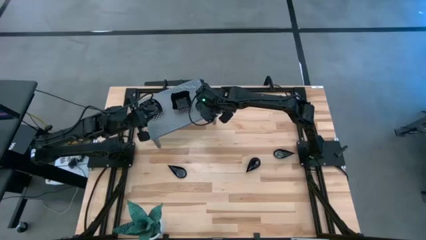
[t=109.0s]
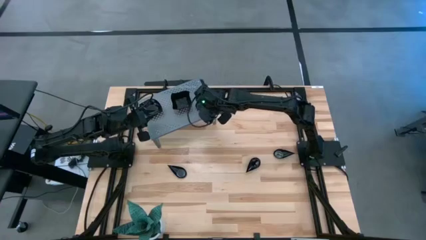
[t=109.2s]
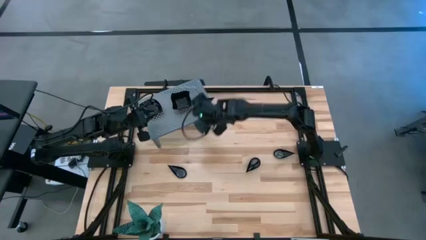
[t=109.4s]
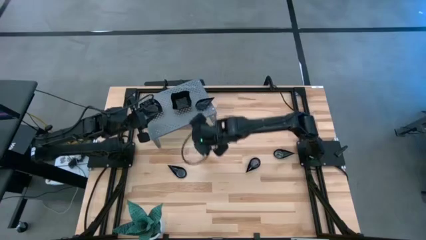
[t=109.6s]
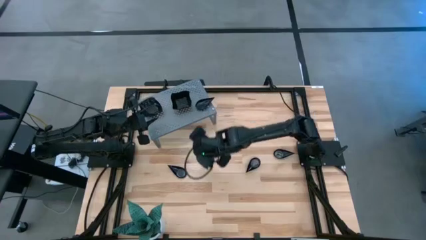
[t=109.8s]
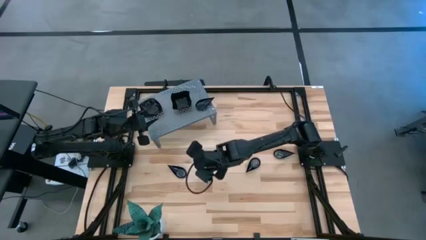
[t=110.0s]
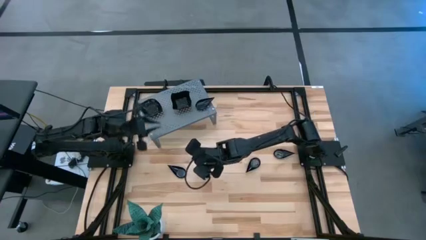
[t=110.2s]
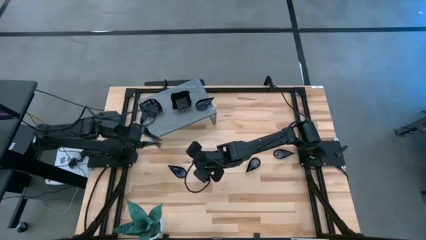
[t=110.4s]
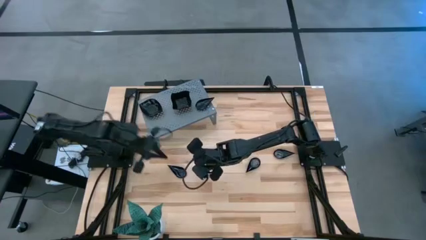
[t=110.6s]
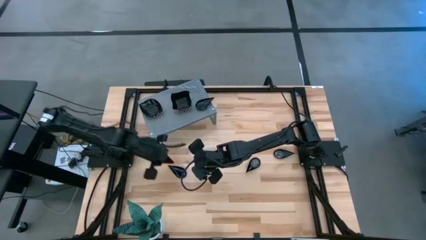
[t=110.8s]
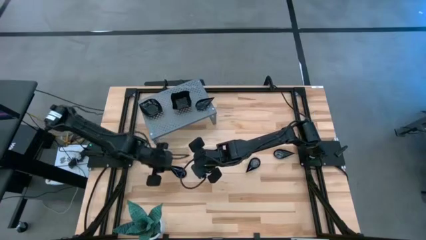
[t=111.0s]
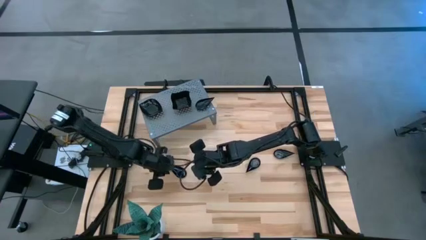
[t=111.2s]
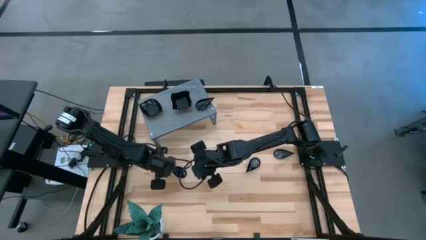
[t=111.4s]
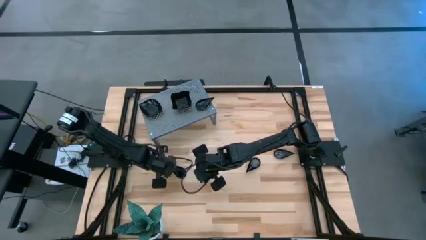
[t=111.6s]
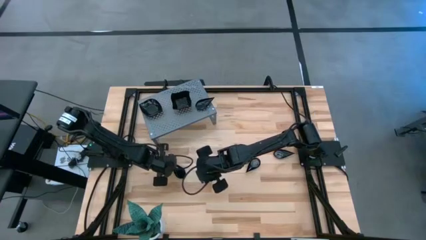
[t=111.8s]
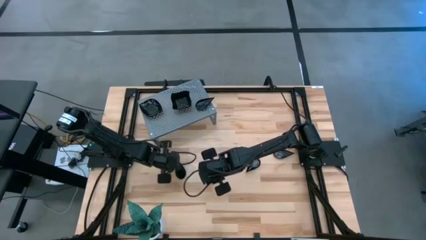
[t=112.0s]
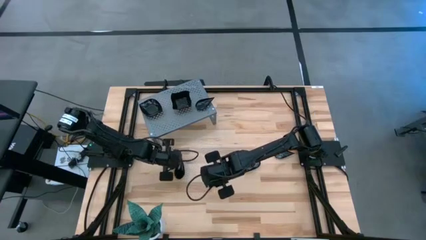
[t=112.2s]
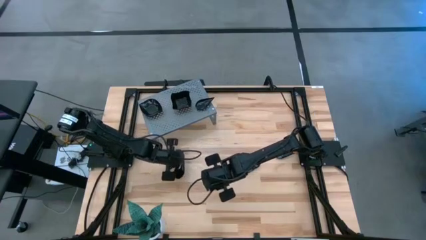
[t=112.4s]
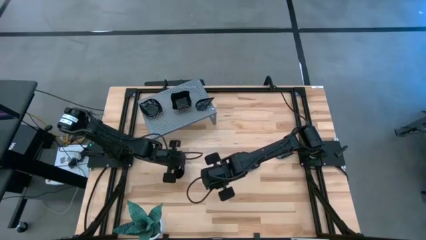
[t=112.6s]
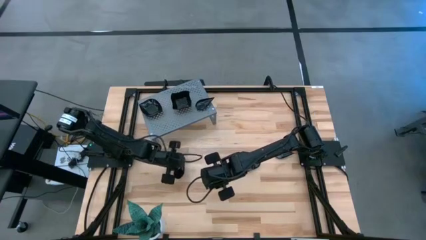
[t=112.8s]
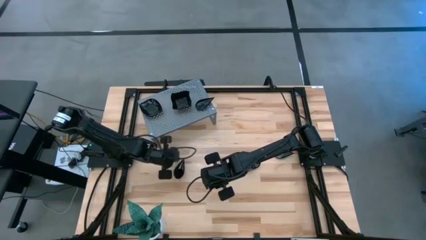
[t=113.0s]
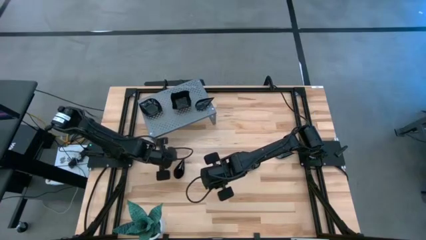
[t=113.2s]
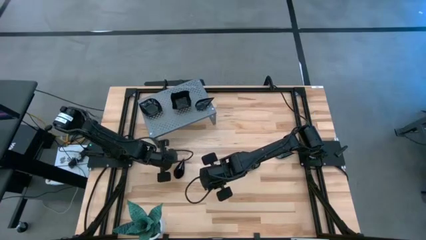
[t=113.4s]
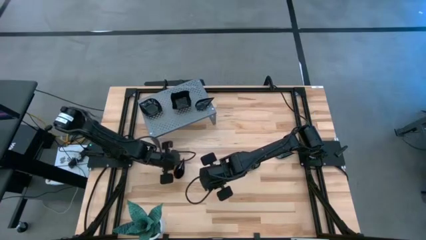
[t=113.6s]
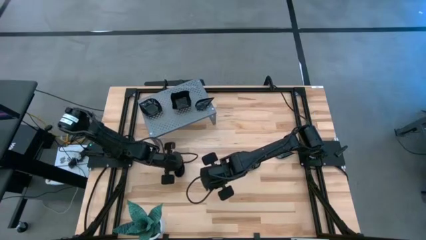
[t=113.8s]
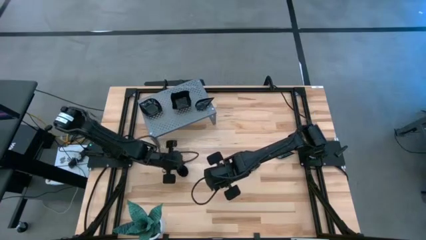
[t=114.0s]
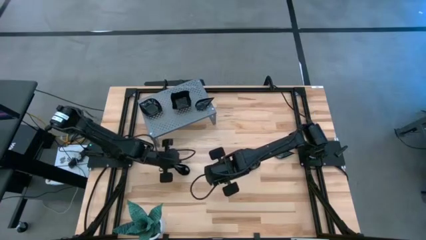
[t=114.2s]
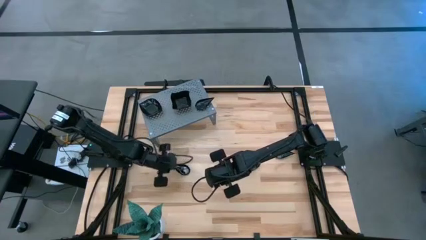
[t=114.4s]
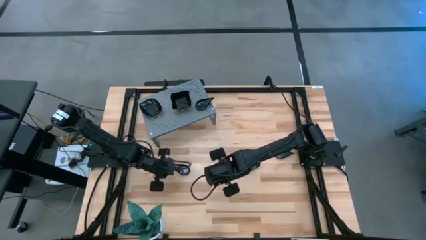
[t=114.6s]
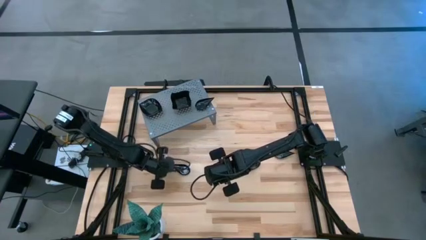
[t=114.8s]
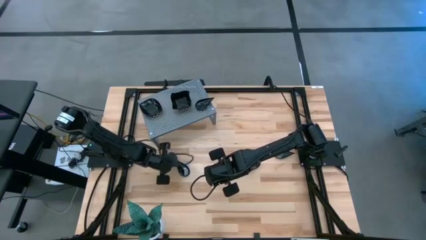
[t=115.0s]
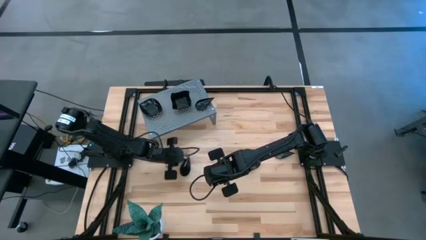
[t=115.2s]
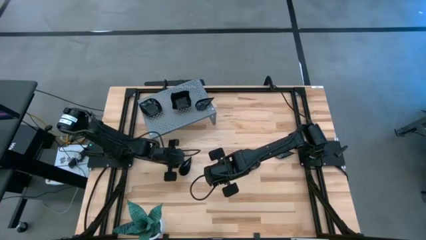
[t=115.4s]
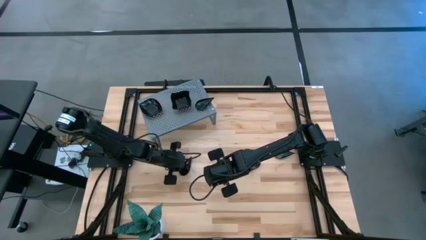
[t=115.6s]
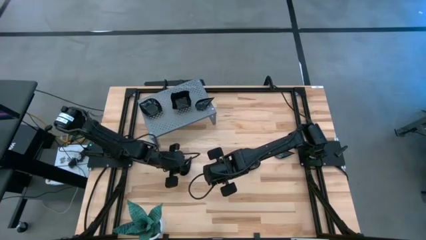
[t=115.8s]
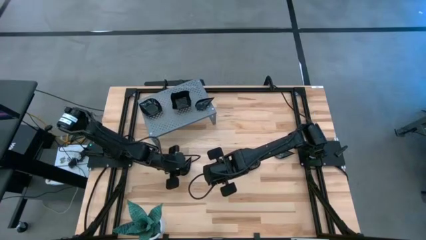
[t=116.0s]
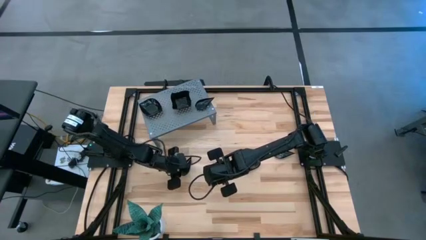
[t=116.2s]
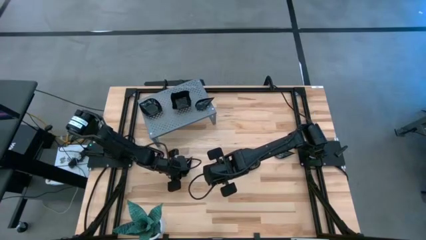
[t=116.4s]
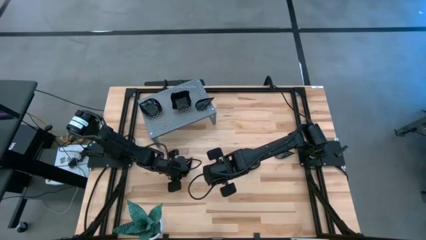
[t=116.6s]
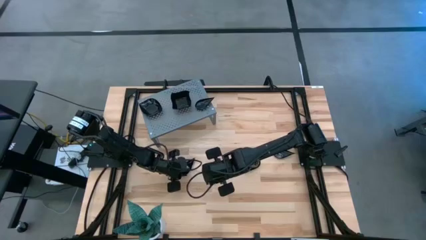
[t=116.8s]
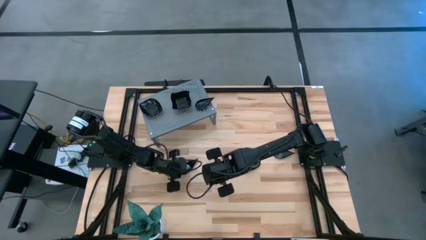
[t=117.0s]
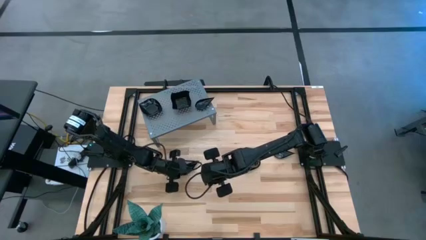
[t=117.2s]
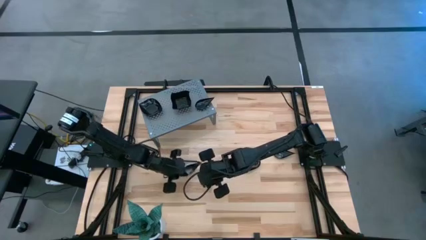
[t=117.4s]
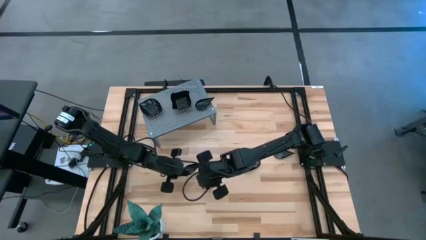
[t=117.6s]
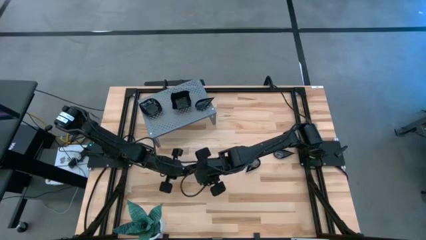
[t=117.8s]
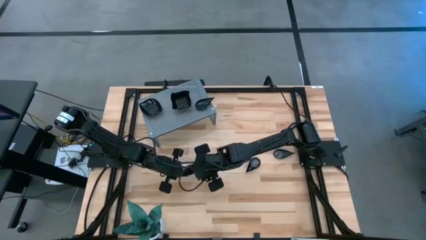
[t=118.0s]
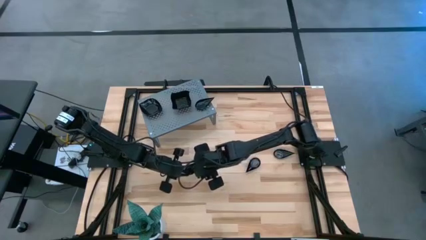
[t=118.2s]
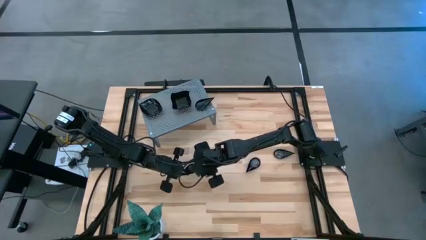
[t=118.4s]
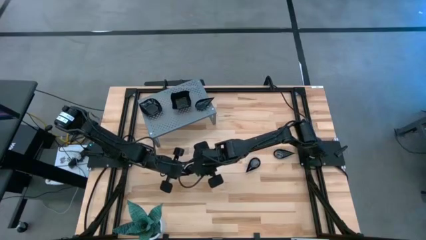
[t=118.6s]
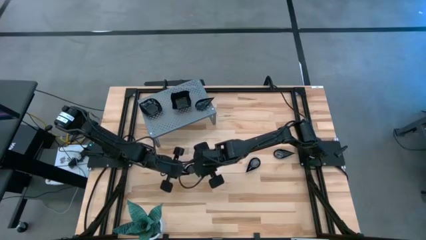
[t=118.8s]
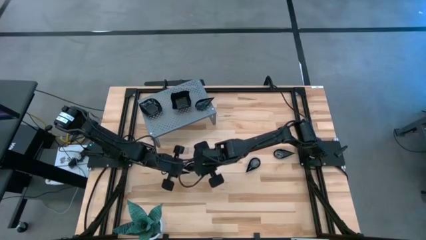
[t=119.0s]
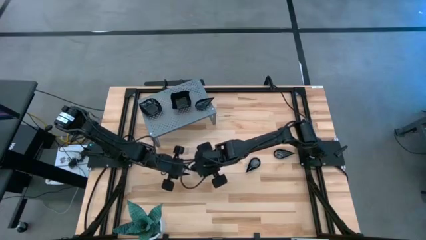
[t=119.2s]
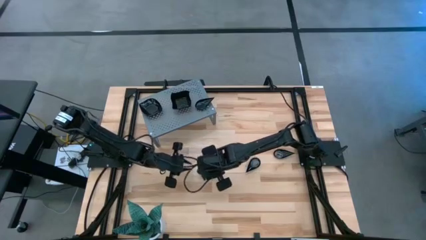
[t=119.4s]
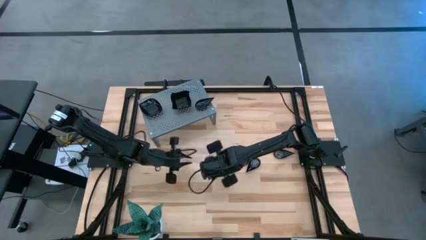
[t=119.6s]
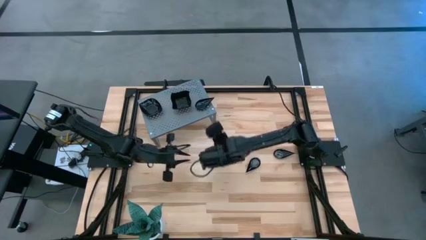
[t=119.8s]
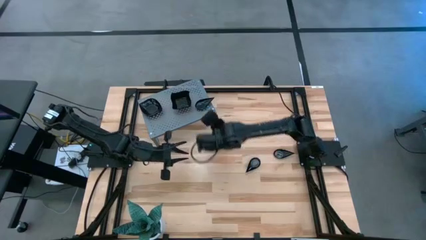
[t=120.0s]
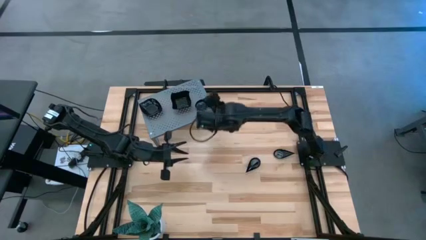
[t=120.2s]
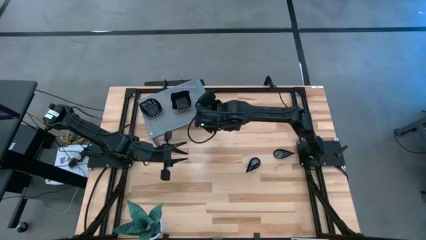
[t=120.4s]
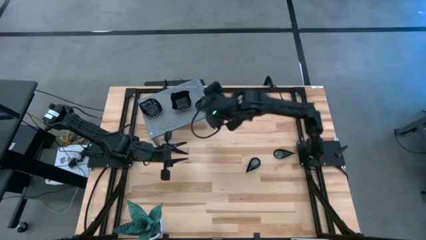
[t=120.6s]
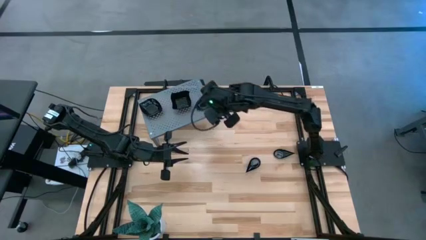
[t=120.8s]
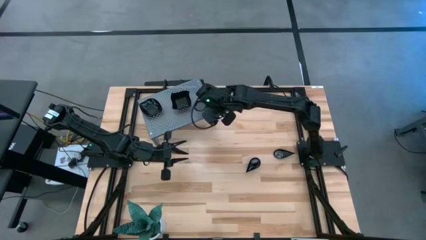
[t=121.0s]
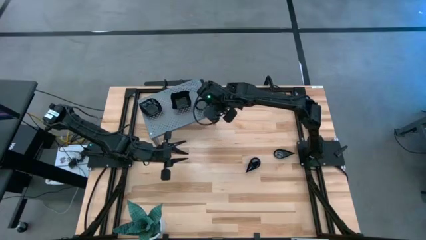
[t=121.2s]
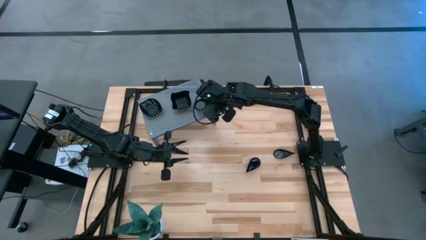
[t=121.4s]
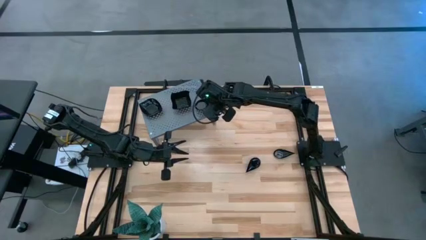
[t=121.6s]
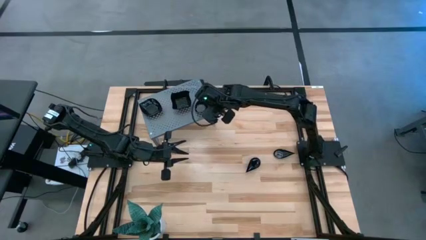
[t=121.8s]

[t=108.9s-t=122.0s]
Task: Pick & Place Mini shaped plates
Stack the black drop-shaped plate on top of the black drop-shaped plate on the shelf

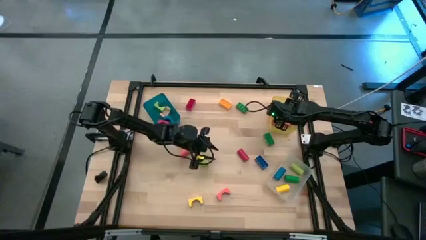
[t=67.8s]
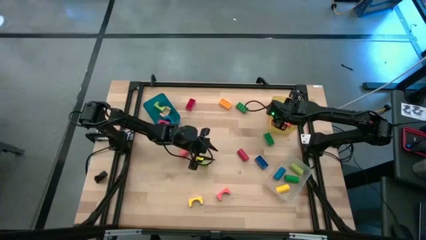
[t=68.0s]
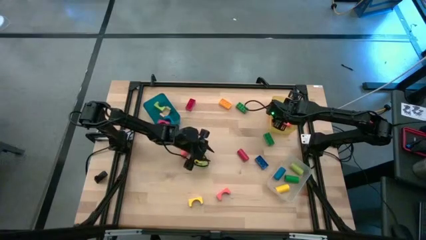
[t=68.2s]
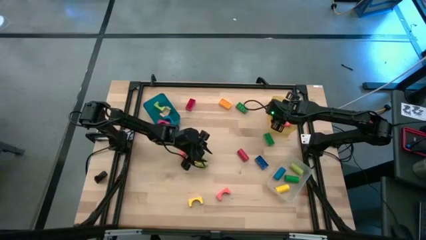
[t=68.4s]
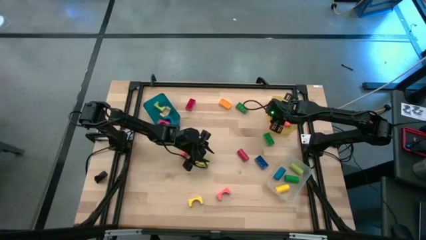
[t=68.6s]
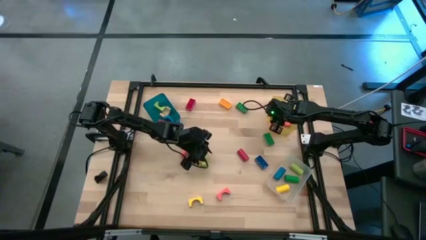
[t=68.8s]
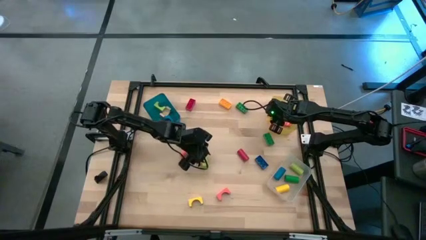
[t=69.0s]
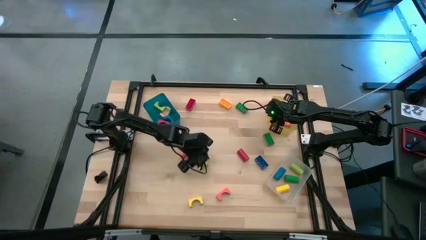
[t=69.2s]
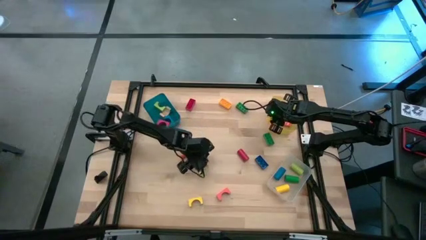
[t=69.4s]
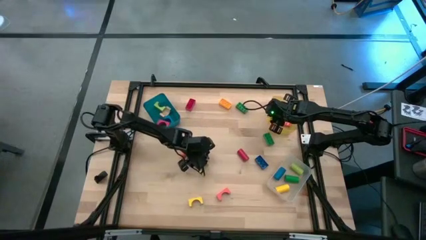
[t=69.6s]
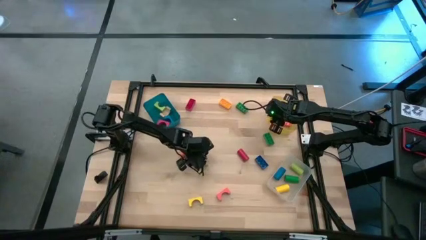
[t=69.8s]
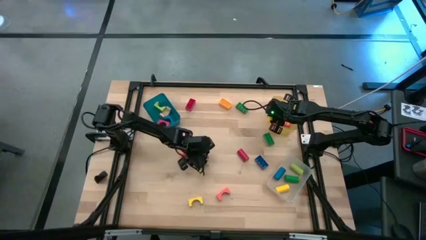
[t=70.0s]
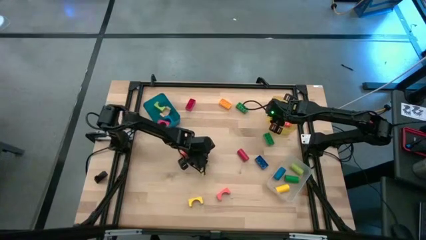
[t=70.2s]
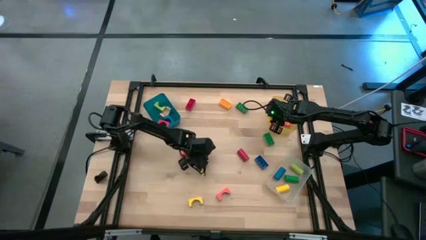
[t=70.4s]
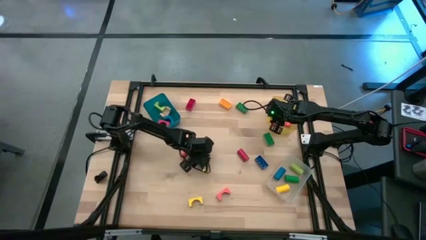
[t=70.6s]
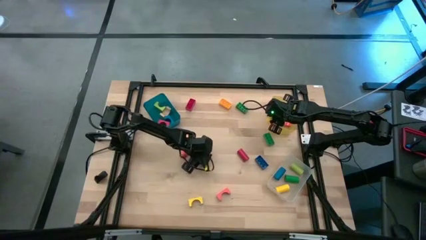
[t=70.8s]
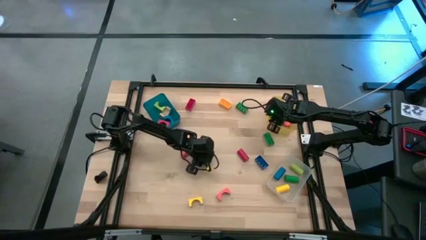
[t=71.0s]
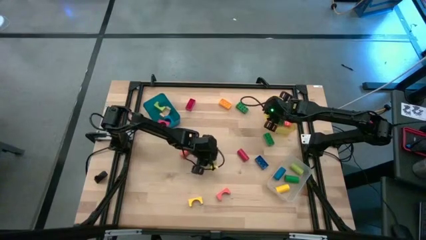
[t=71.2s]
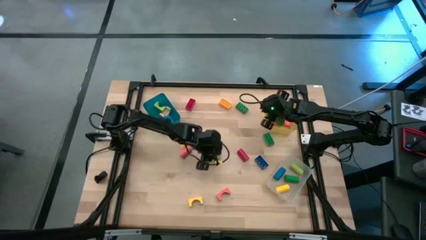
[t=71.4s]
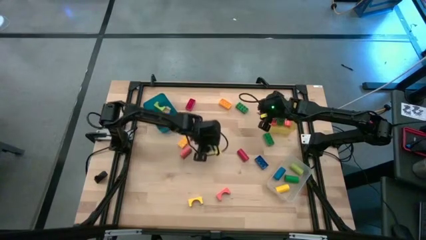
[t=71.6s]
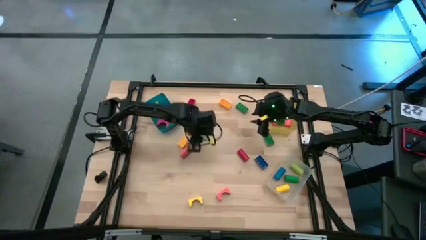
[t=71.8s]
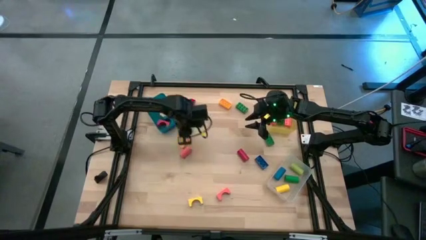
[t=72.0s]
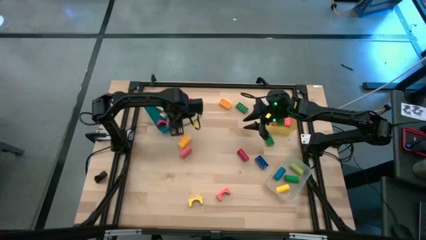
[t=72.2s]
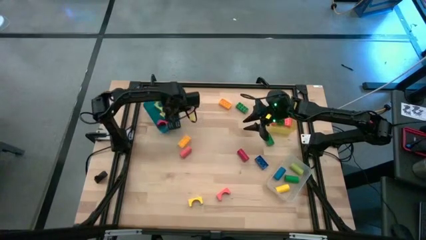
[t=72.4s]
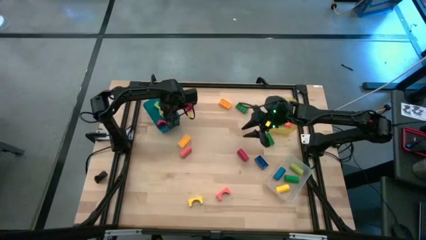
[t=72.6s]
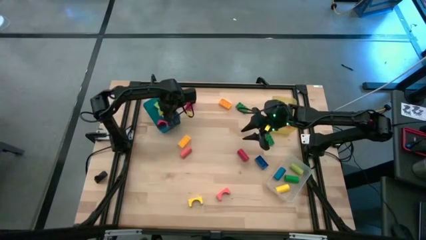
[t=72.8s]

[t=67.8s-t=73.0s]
Task: Sort blocks by size
Put the light green arch block into the blue bin
